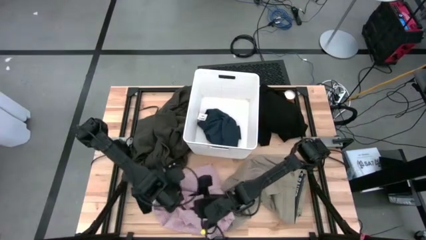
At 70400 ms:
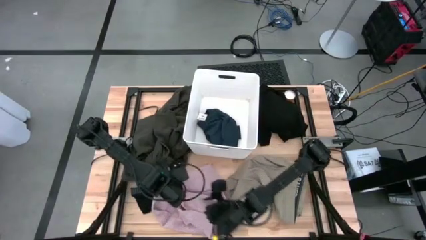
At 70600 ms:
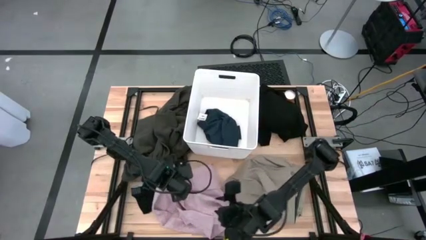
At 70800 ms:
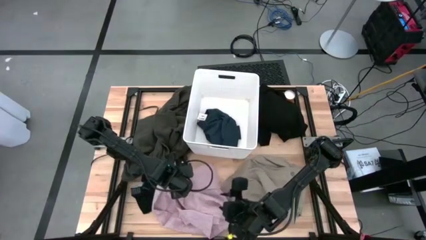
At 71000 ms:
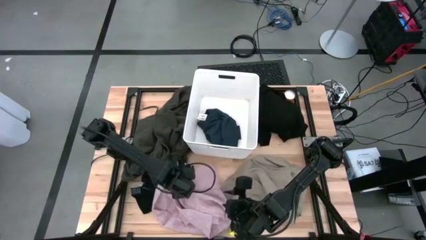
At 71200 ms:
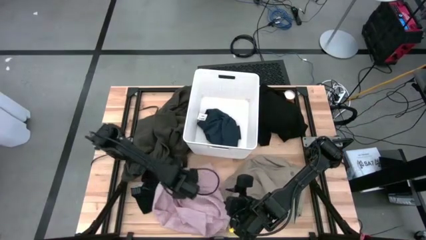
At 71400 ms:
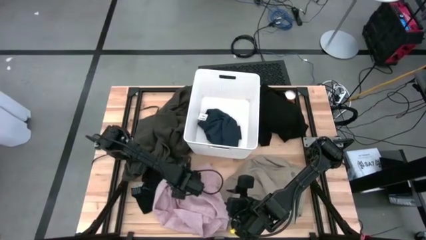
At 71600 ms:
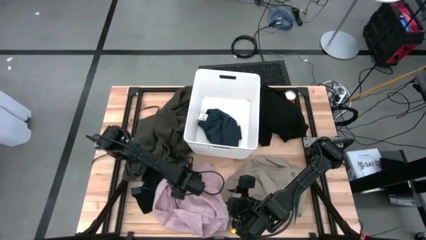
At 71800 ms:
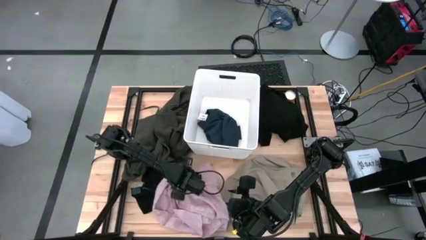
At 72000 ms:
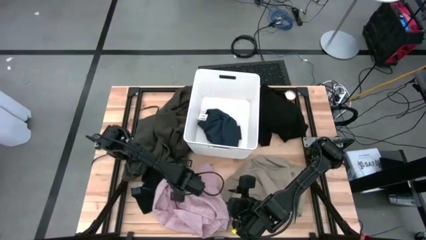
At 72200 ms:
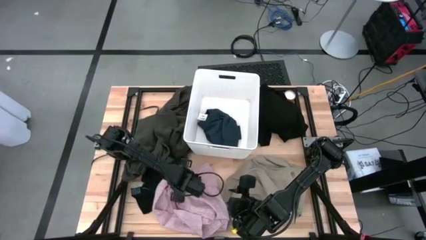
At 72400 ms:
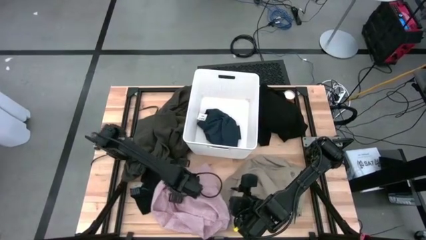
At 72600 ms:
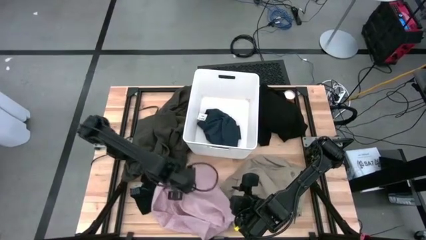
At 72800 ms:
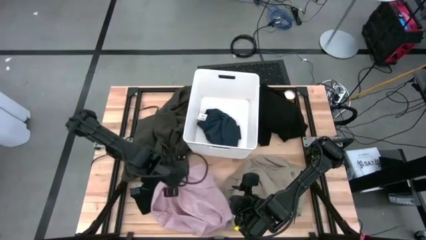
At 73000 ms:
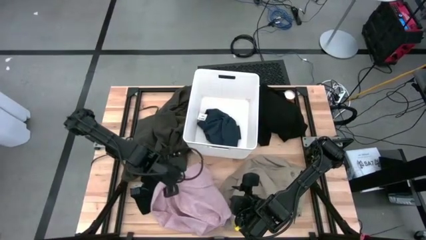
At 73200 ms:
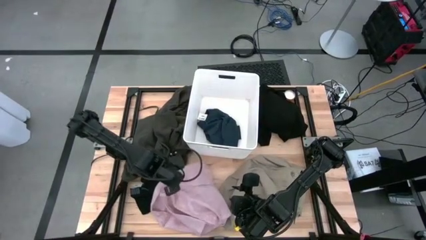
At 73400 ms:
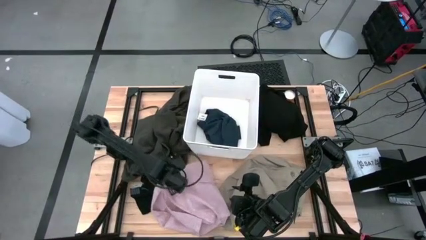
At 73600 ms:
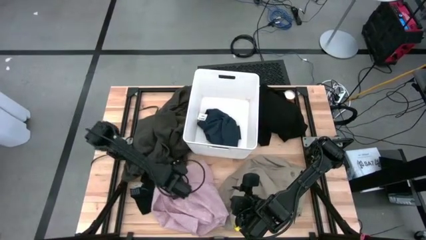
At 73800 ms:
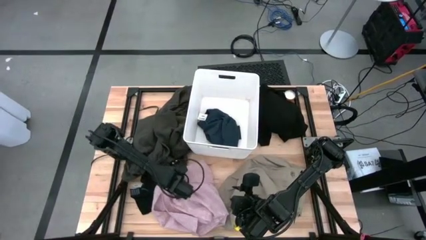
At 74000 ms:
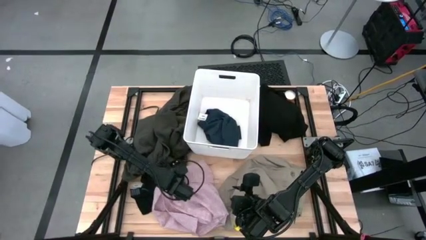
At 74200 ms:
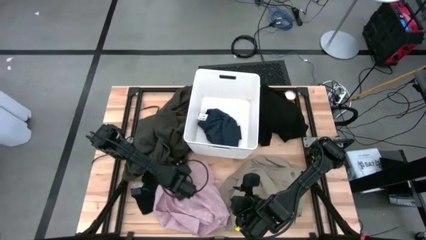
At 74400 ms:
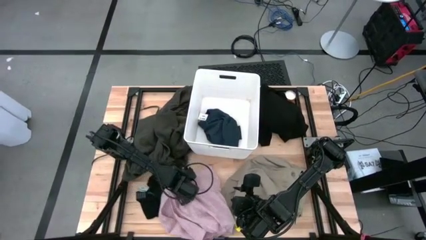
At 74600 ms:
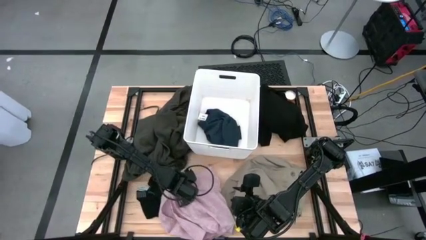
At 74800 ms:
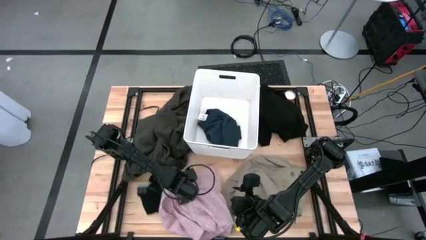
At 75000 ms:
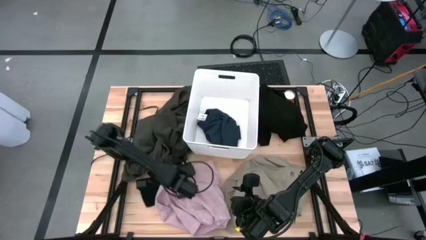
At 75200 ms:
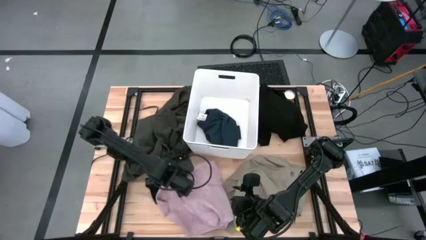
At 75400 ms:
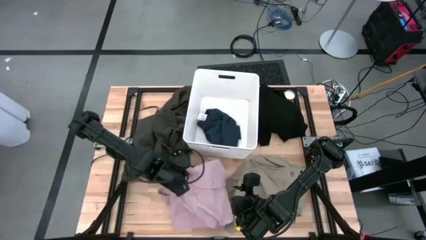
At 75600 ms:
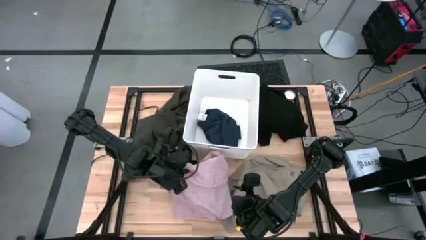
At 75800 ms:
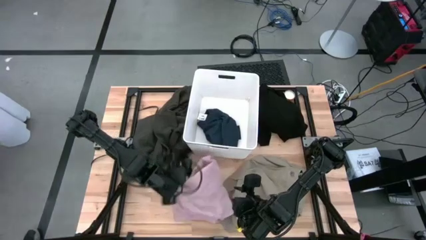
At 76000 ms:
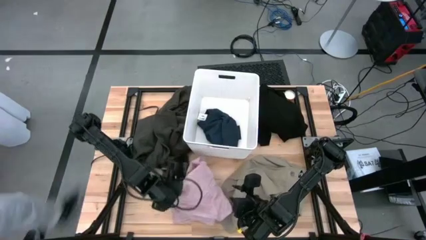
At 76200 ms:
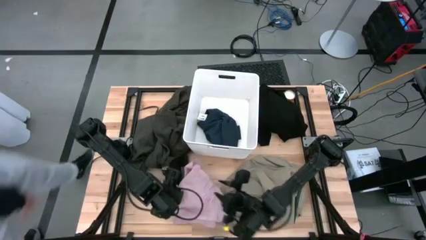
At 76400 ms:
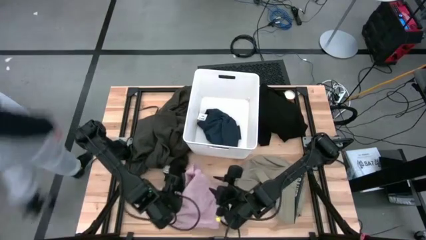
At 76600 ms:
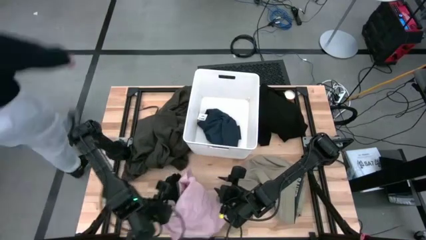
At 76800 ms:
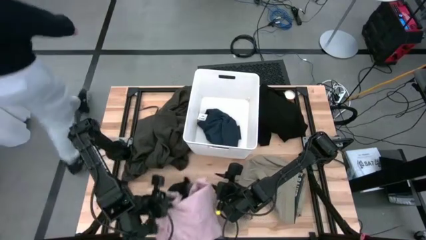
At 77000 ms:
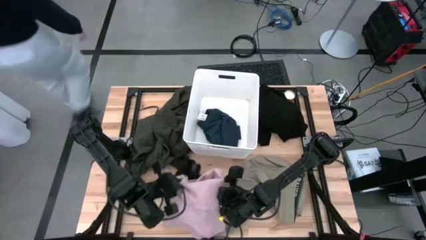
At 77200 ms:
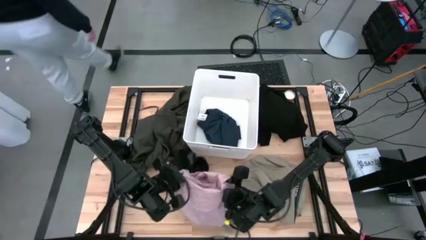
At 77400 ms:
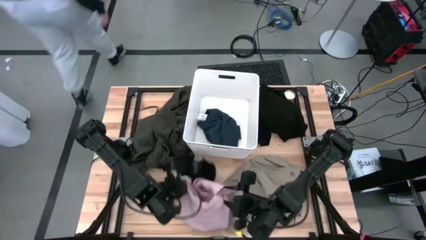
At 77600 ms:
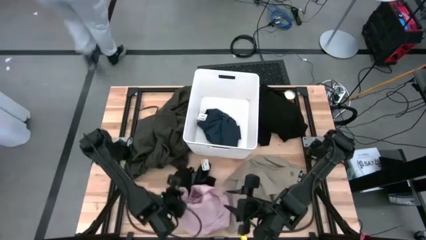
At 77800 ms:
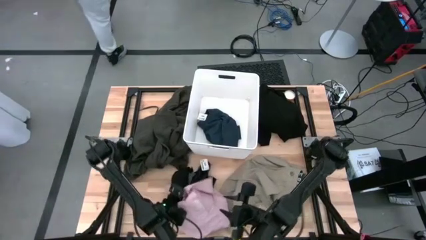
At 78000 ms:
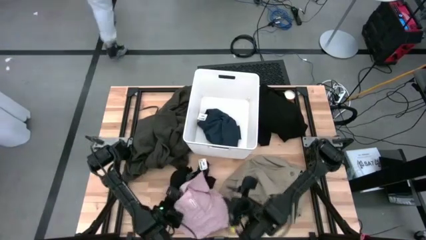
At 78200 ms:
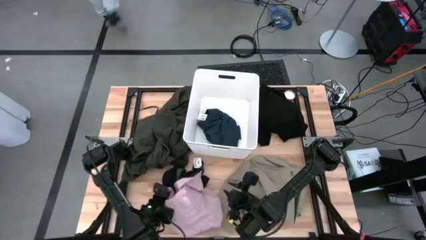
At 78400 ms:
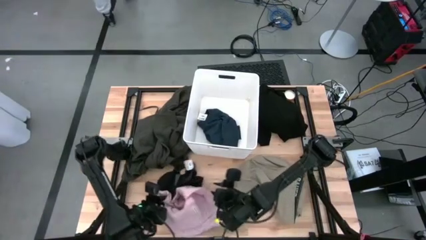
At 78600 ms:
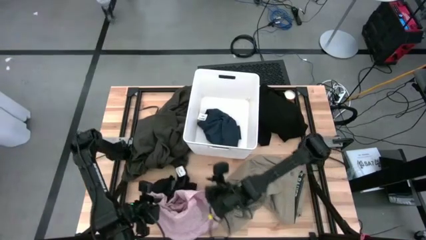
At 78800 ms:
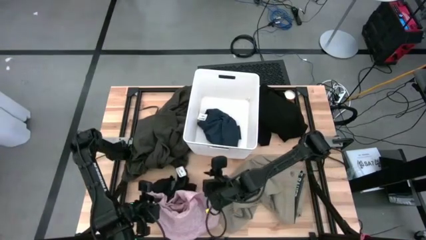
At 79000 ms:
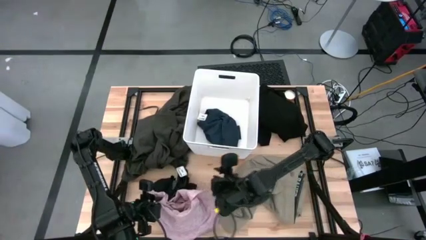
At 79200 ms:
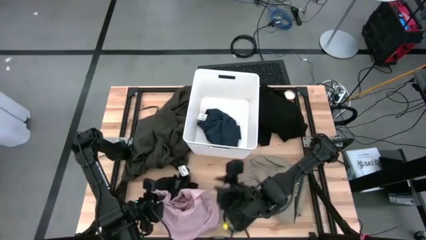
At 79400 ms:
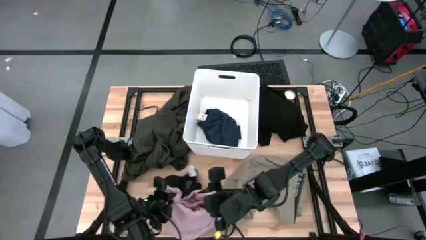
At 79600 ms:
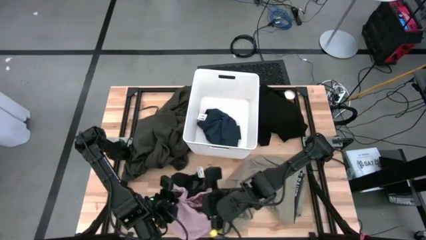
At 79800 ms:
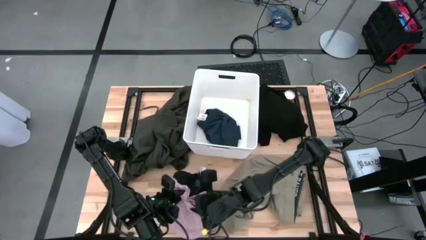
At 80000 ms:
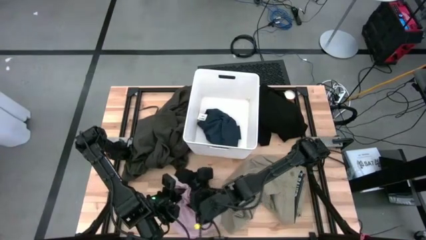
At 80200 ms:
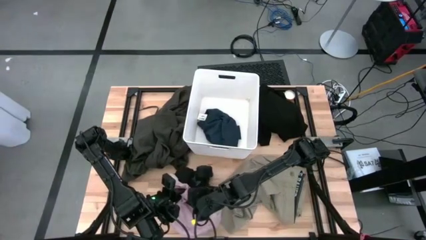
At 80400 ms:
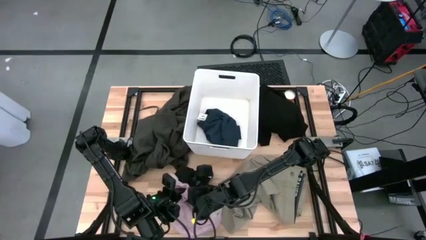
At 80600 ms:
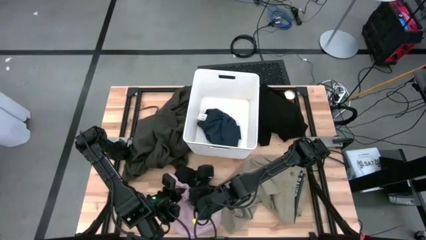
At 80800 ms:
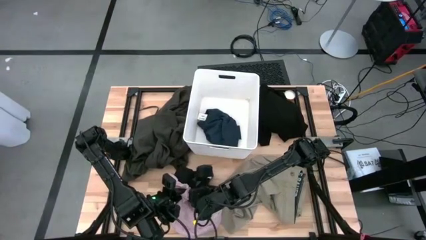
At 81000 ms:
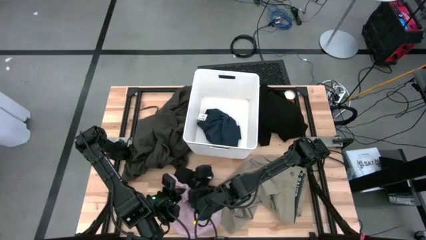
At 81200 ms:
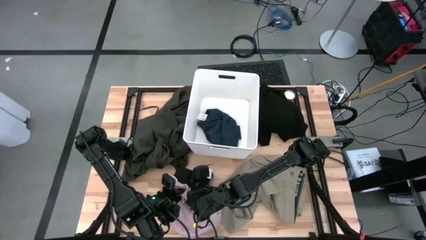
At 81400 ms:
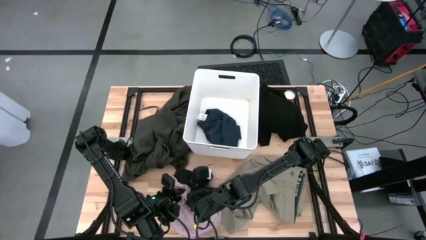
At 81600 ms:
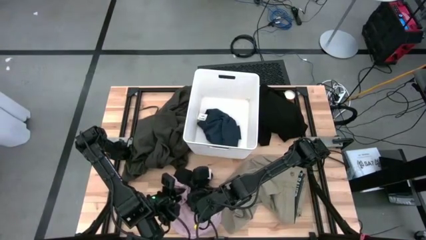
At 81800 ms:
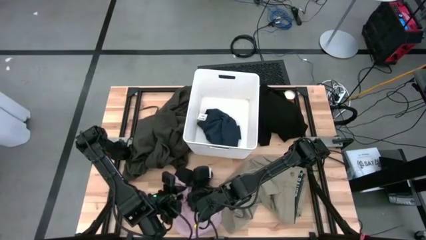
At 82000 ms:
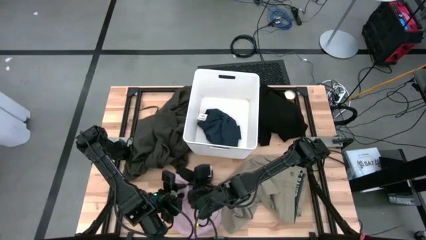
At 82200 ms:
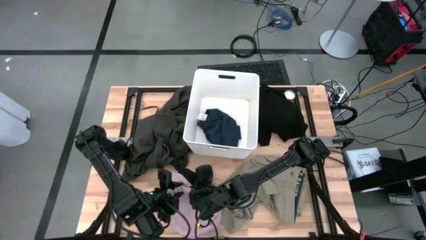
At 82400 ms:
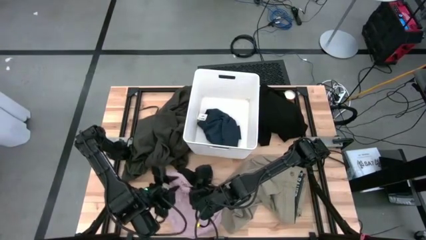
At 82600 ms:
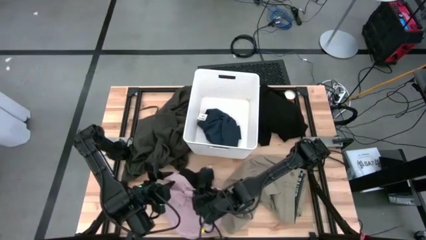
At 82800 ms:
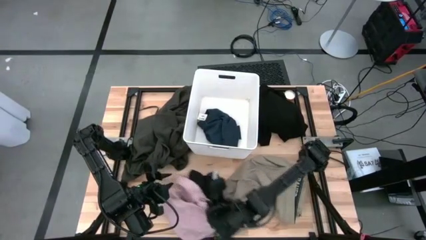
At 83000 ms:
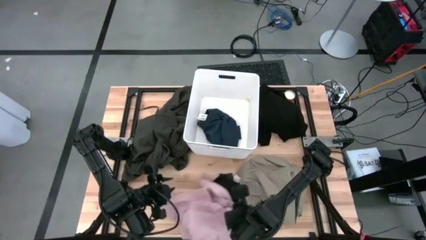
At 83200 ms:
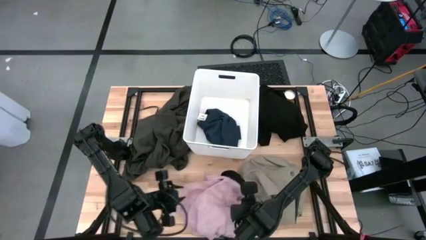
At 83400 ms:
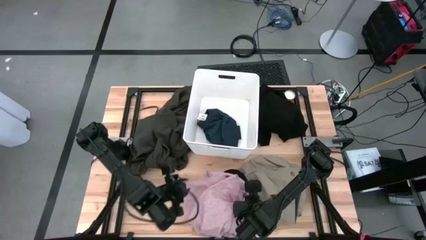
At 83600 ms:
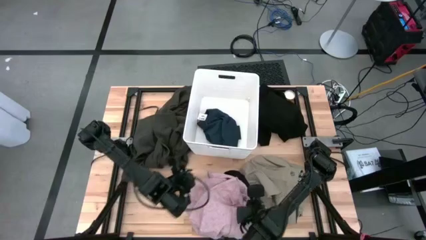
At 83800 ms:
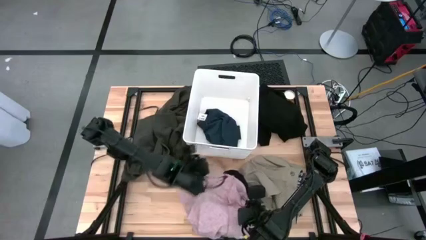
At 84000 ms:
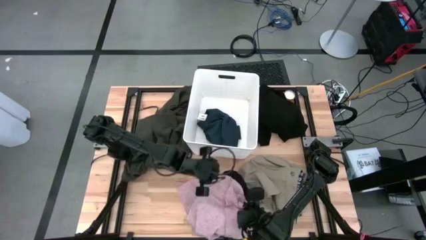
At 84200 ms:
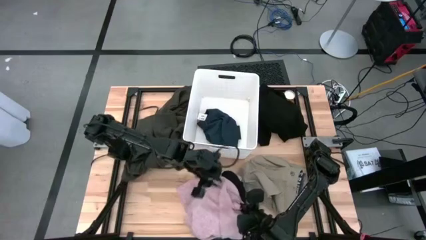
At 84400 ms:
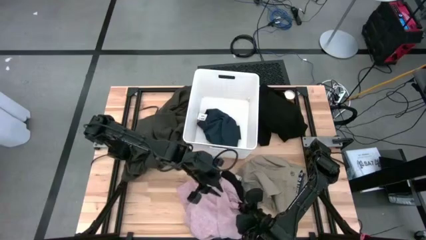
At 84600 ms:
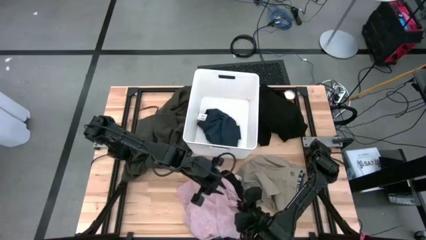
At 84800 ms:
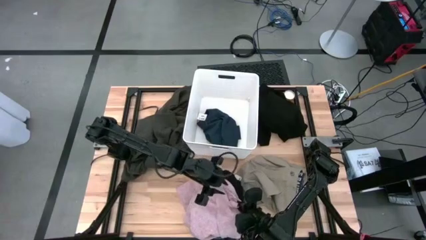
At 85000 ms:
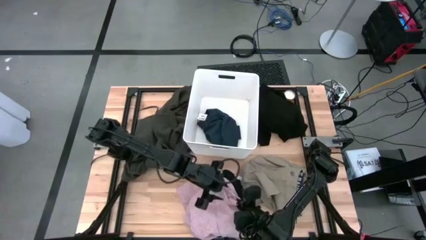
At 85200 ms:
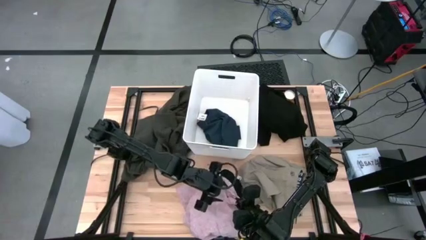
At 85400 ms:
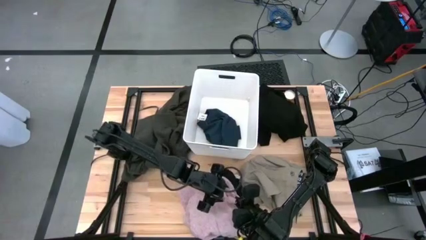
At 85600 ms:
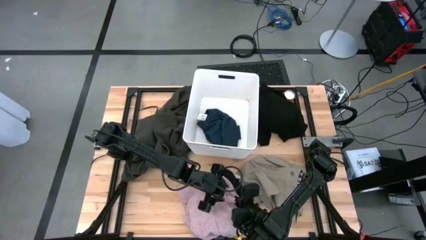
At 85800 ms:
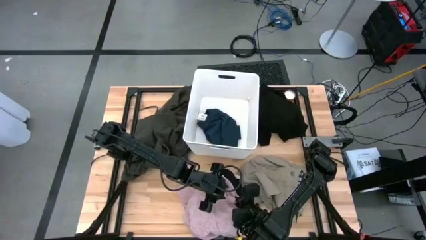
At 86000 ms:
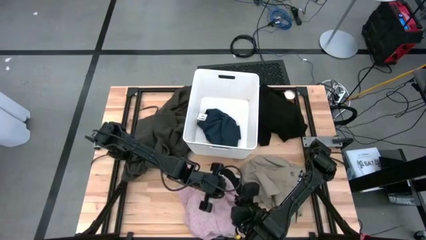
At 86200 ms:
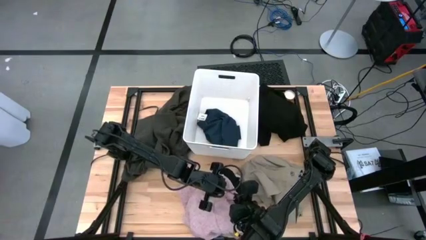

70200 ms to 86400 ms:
Task: Sort clothes
Put the pink shirt into the white laundry bin
